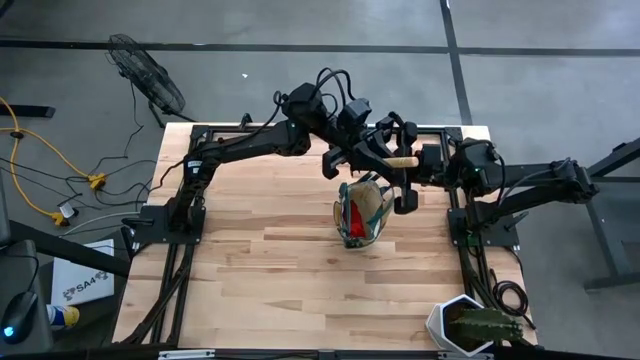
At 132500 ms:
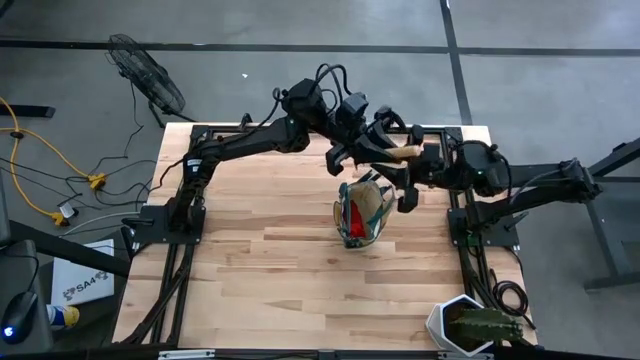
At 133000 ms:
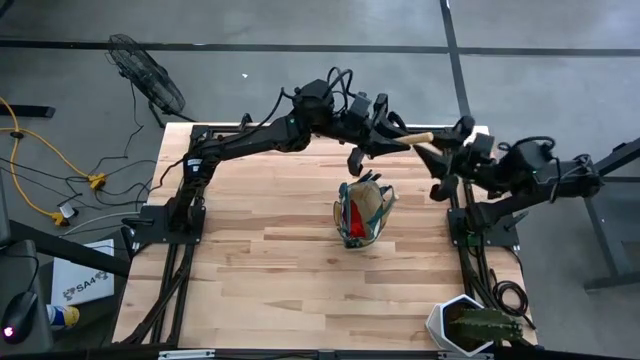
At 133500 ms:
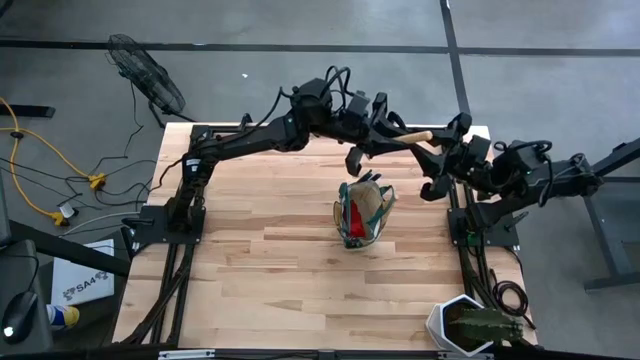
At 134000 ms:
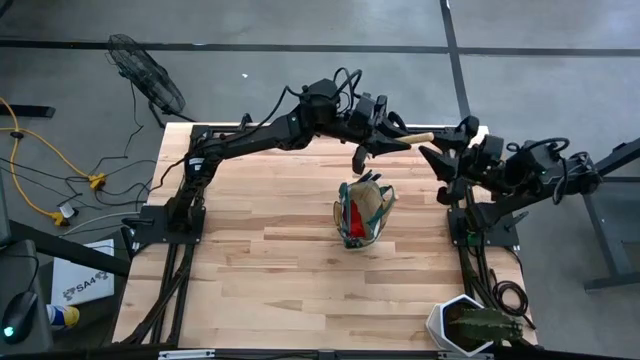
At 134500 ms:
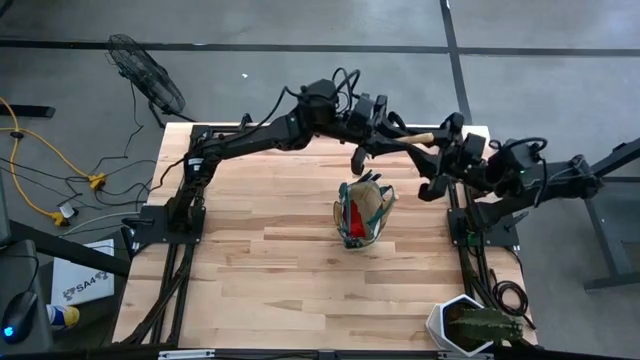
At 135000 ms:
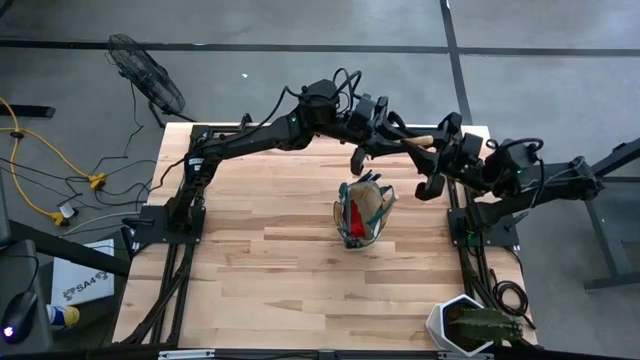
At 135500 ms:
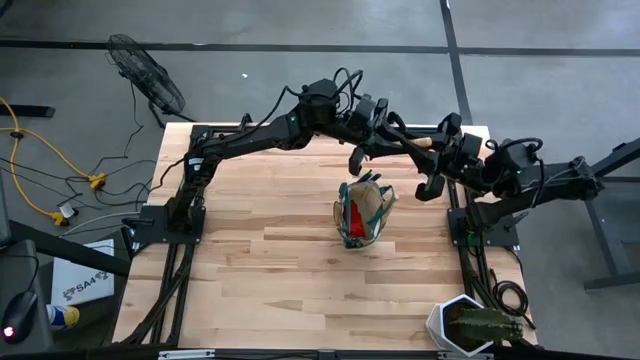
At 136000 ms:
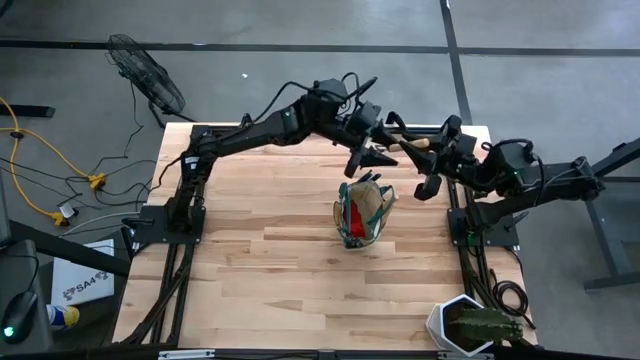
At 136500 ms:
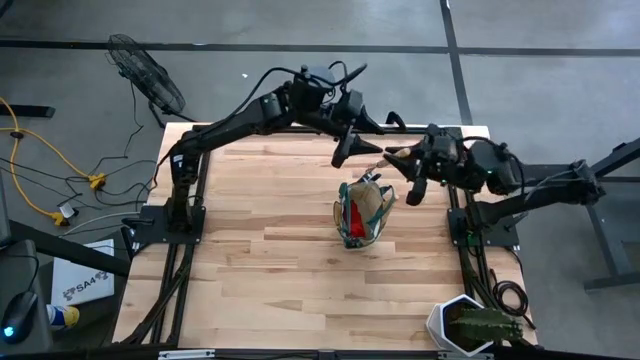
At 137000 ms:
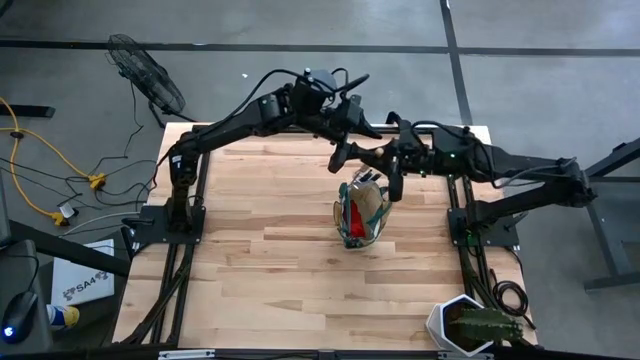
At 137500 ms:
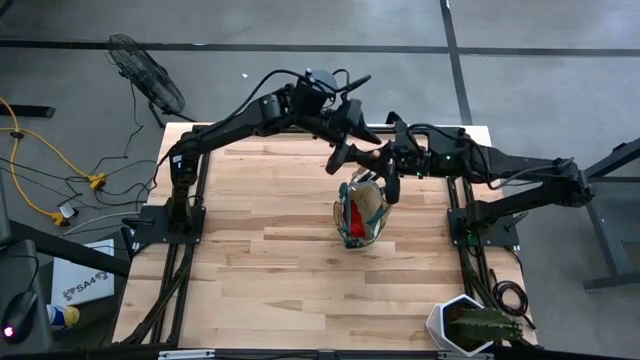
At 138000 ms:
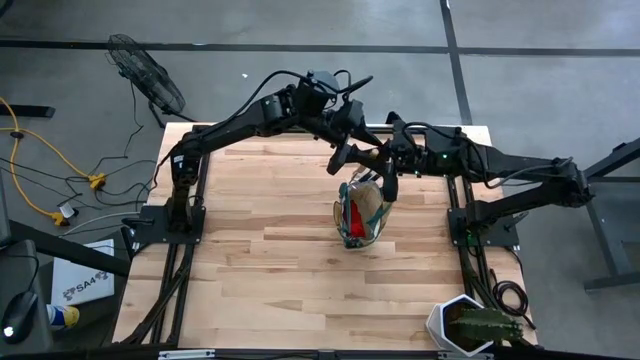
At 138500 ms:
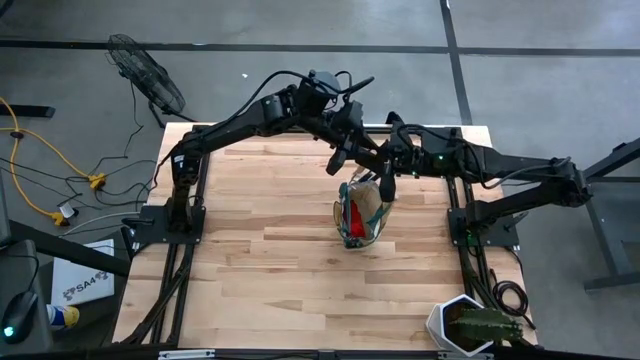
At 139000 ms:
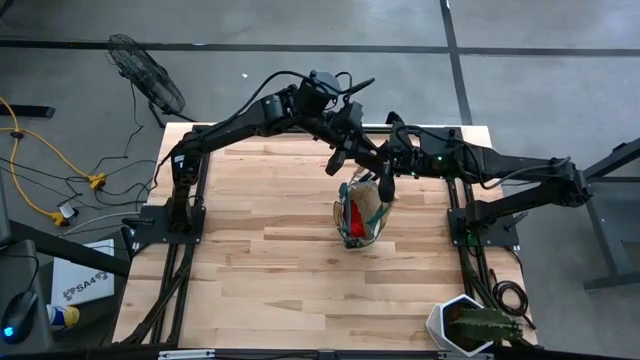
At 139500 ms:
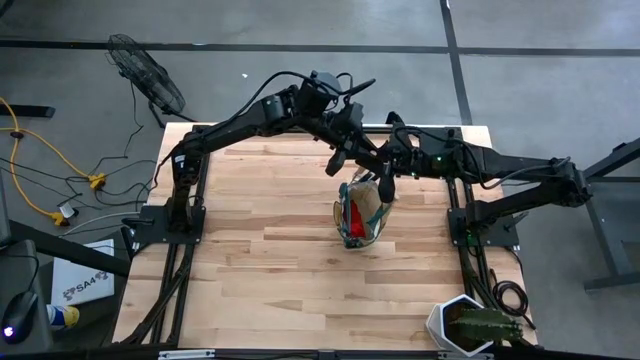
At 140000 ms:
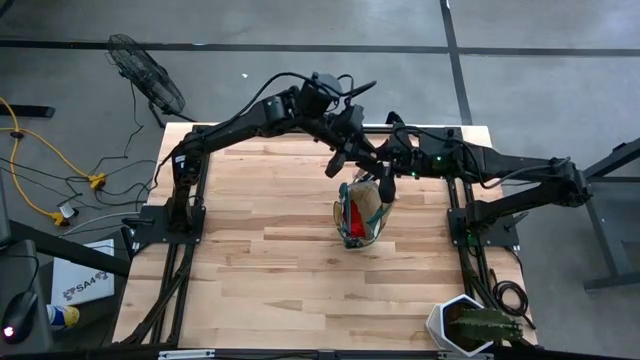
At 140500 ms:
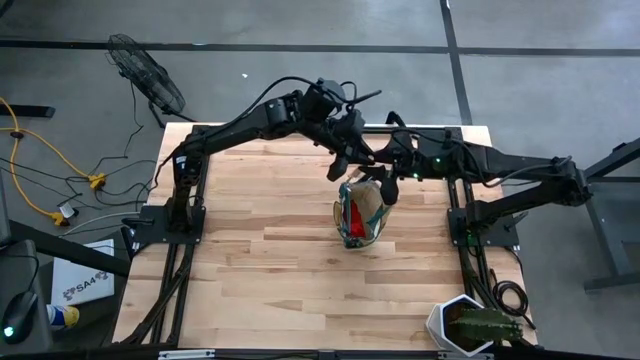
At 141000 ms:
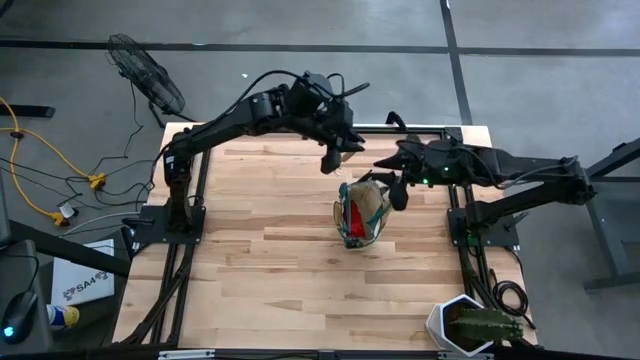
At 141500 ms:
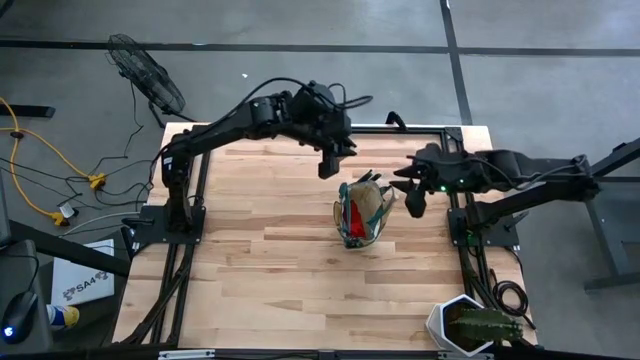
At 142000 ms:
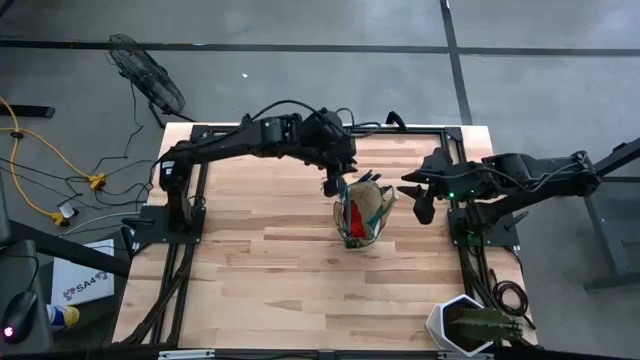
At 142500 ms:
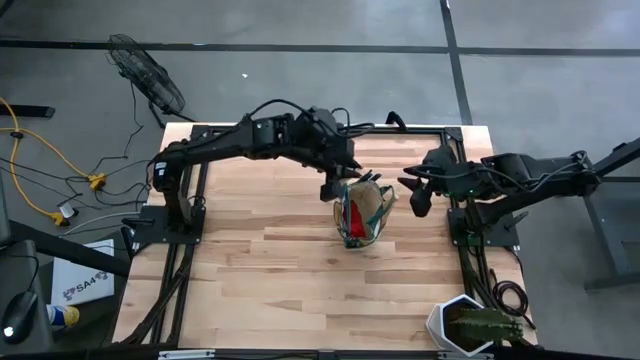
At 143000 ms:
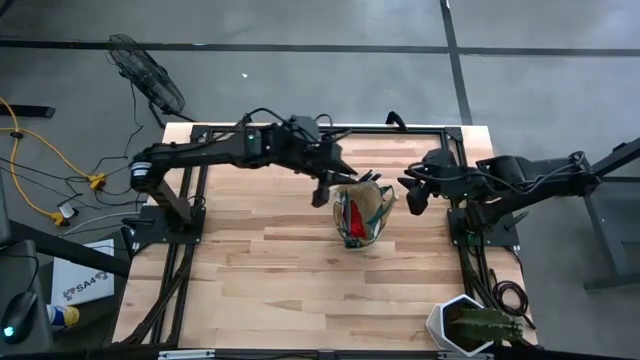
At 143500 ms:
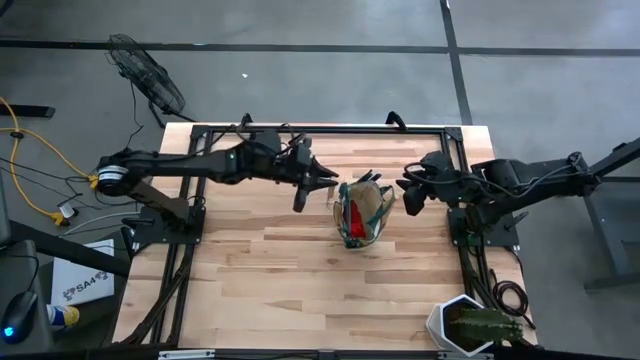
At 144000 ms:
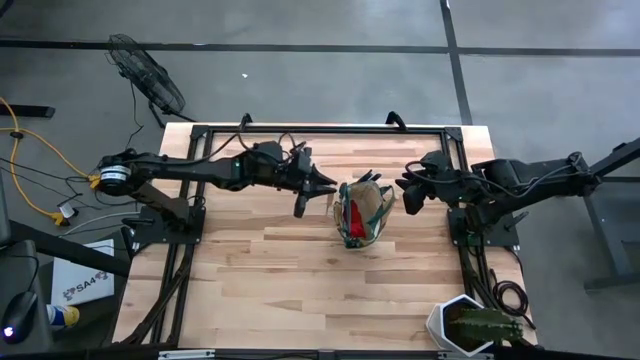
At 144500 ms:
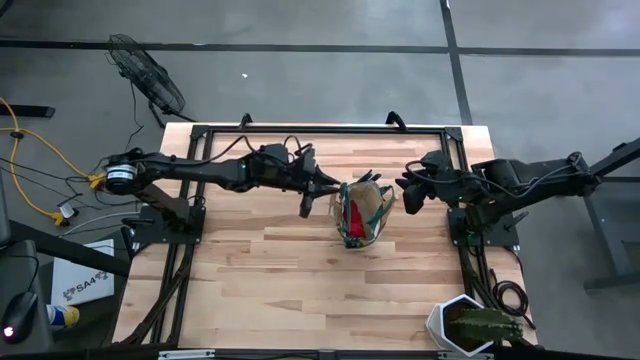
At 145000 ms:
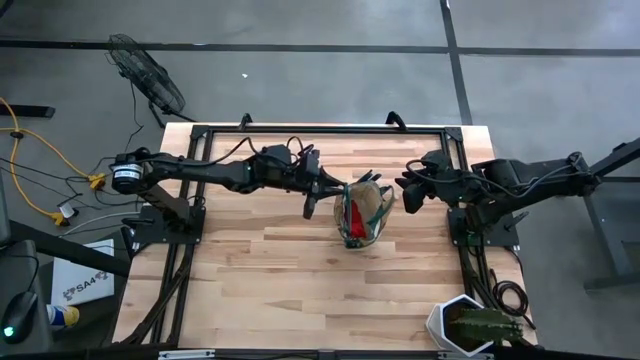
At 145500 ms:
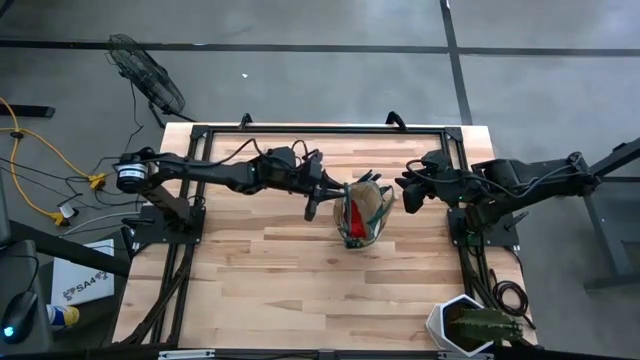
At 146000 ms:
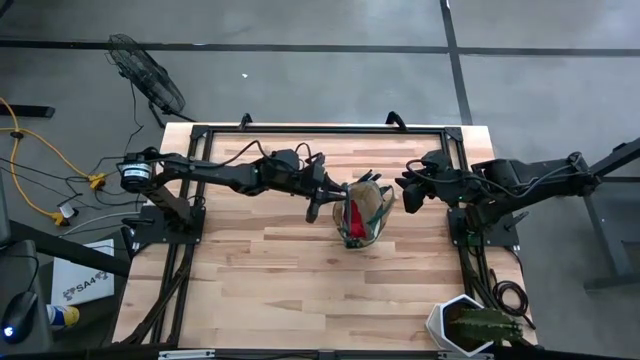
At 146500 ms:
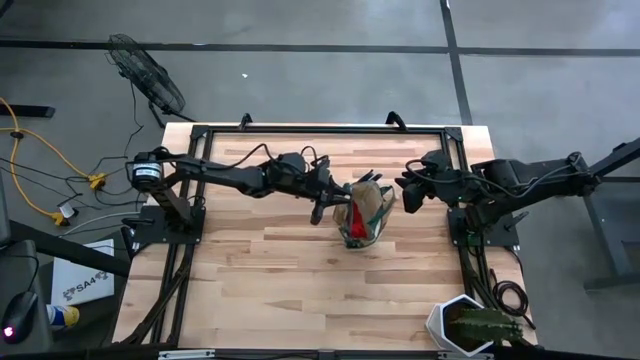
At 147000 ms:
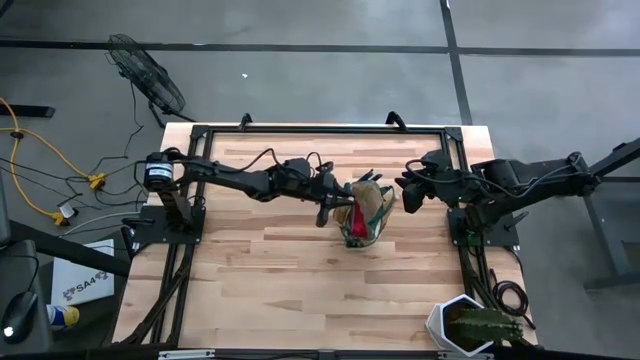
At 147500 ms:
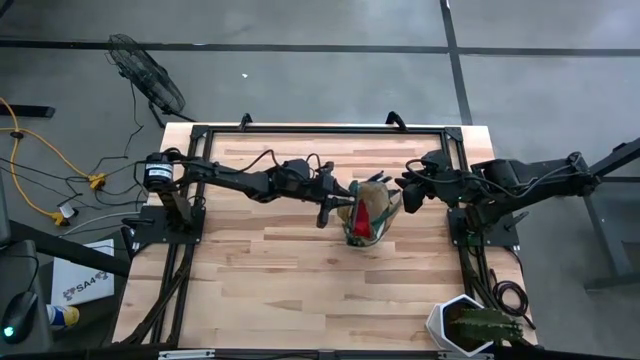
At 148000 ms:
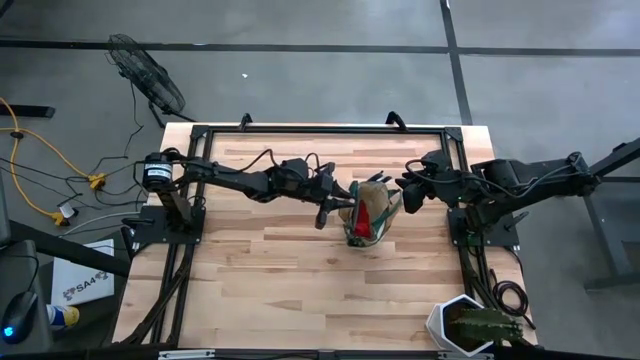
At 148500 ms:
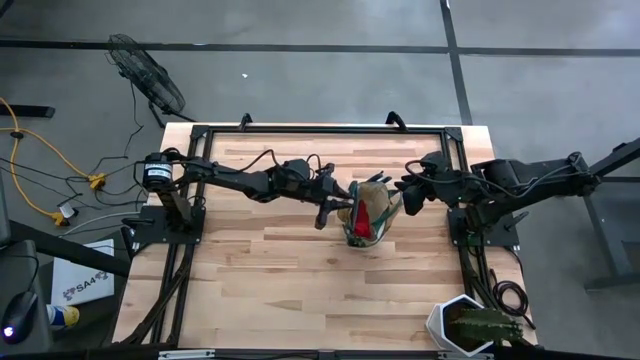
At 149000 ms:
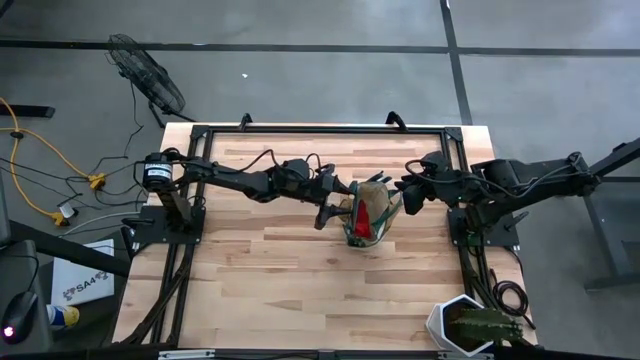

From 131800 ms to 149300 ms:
Task: Pick & Place Garden tools in Gardening bag
Put the brown hand rake into the white gardening bag

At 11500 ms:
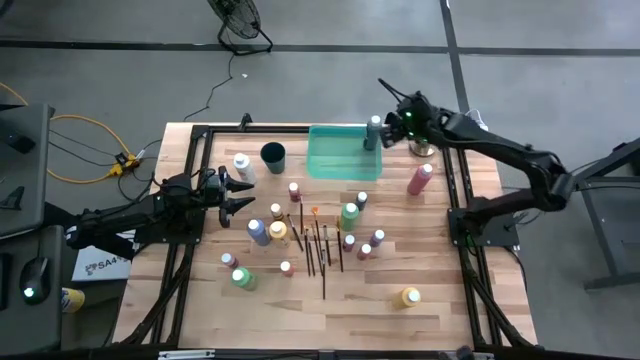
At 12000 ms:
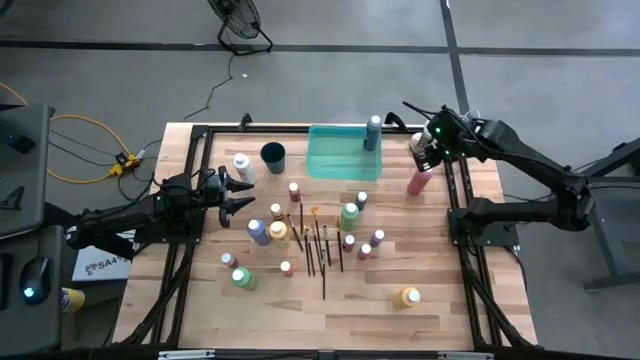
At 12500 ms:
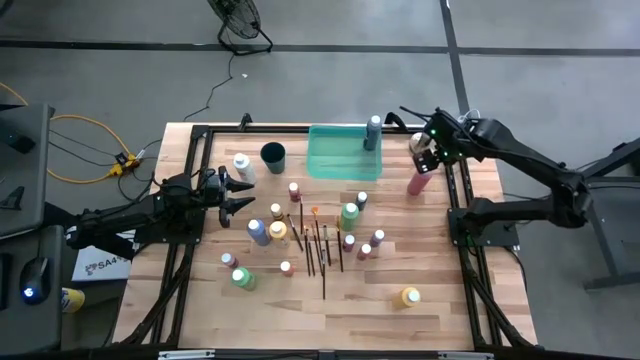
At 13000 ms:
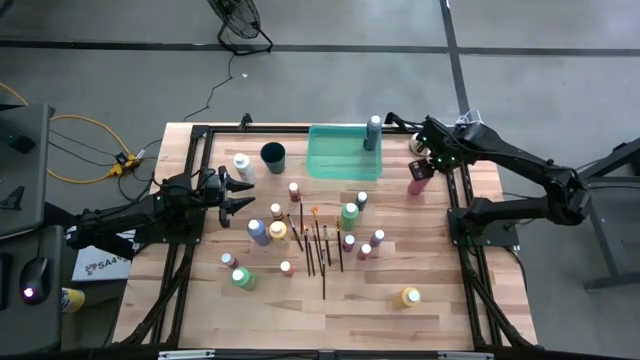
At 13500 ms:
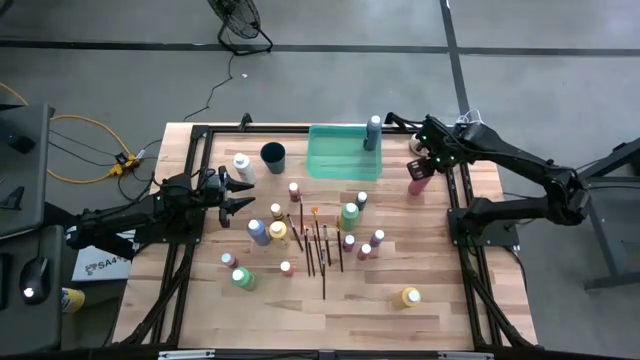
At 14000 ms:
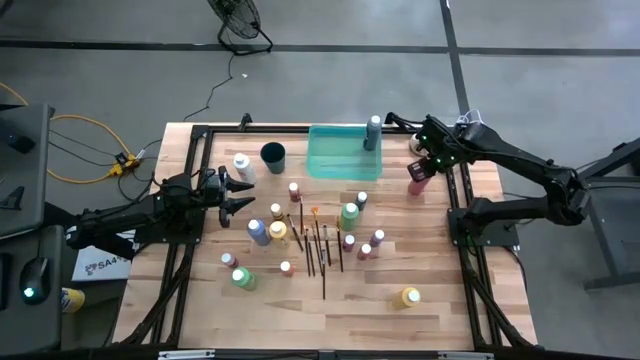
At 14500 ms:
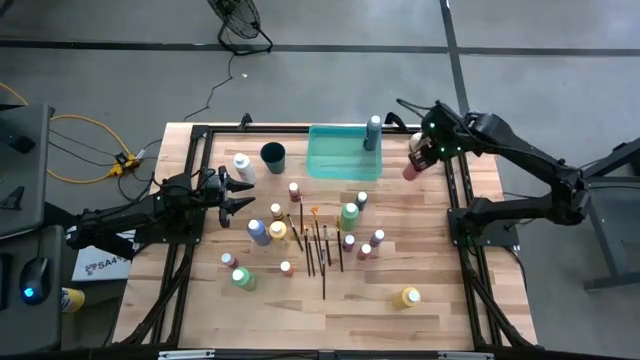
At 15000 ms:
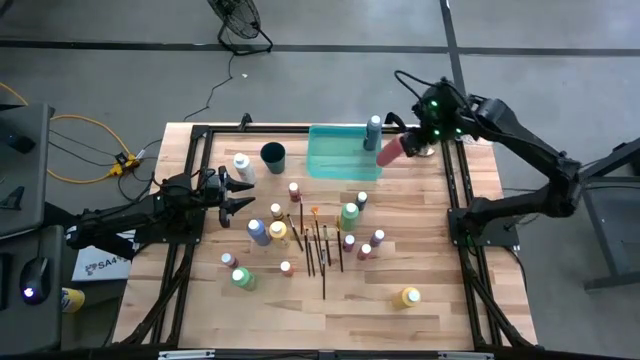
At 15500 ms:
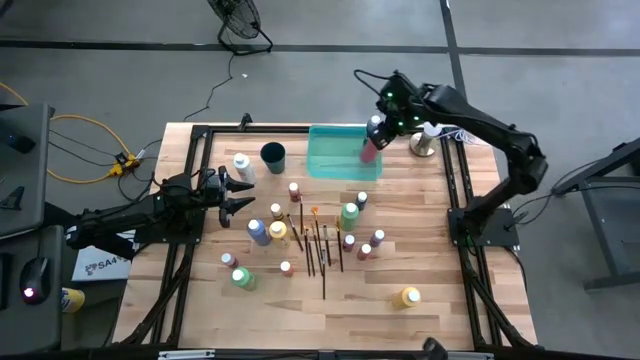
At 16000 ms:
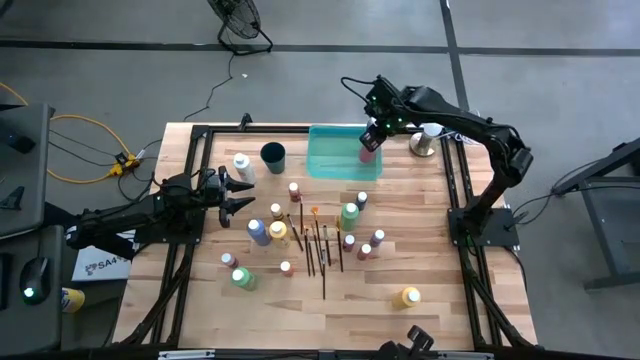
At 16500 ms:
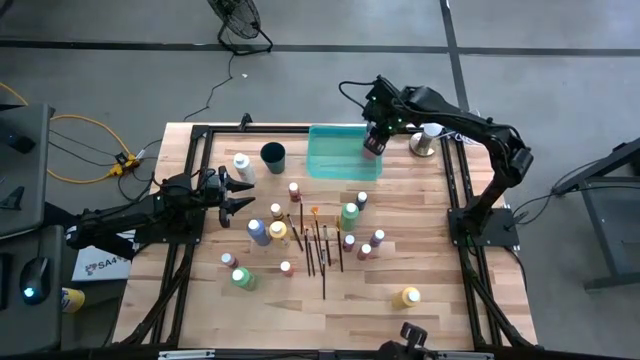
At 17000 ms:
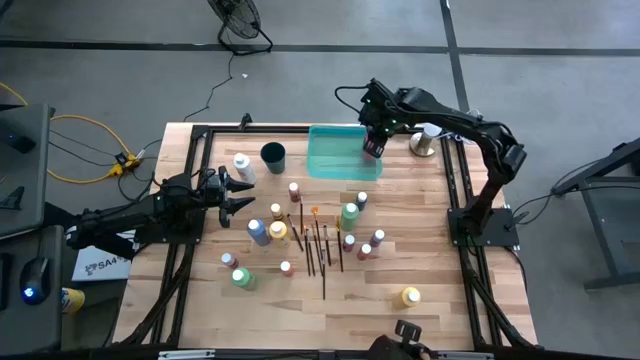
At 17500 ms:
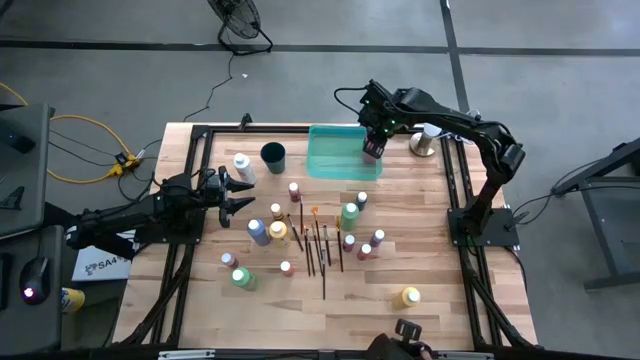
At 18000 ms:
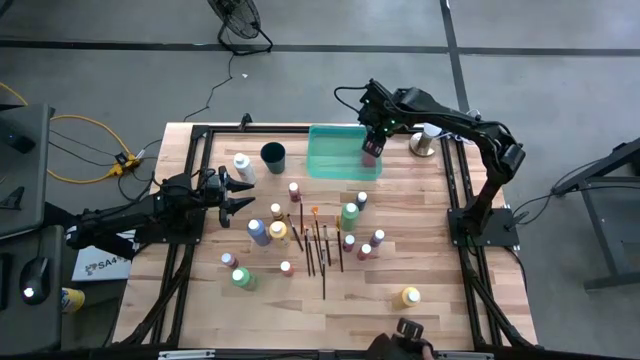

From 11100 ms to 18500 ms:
Task: Pick & Place Paint Supplies
Put the large pink paint bottle into the green bin
